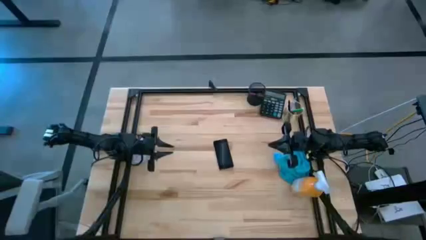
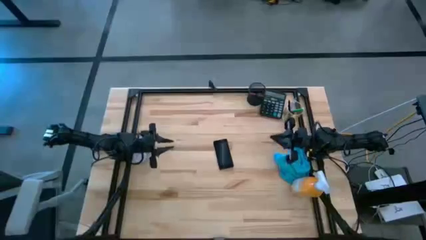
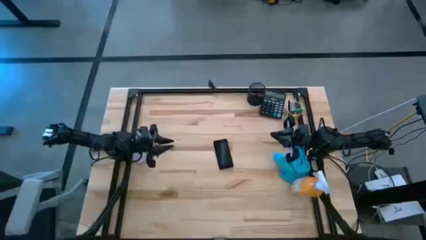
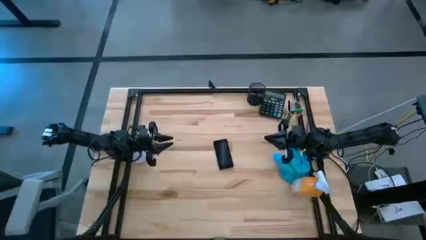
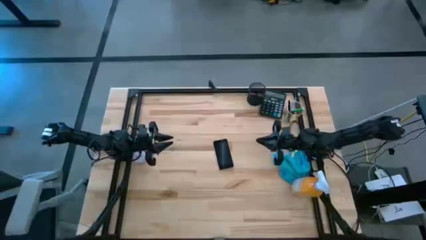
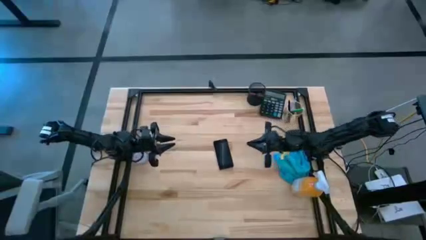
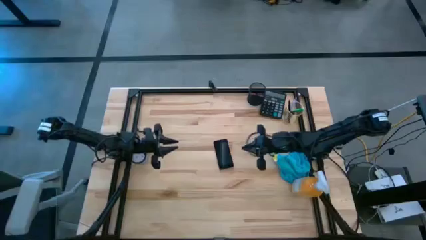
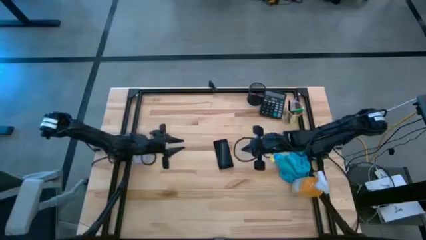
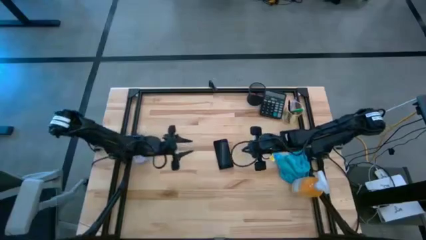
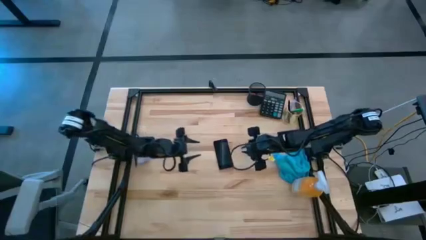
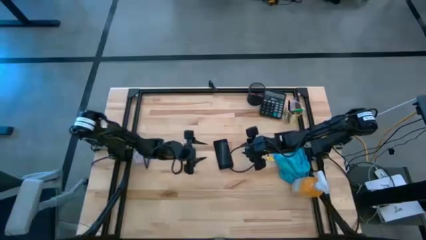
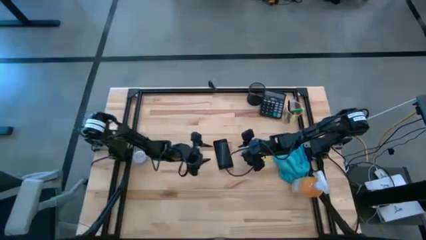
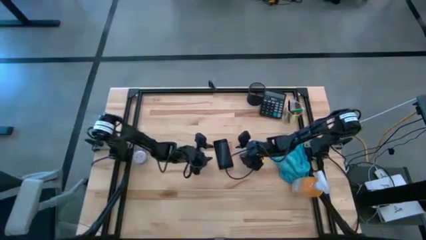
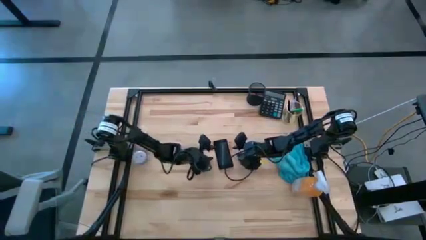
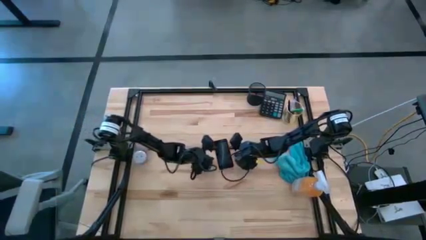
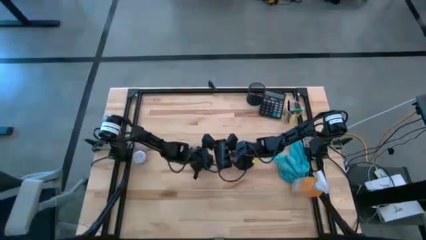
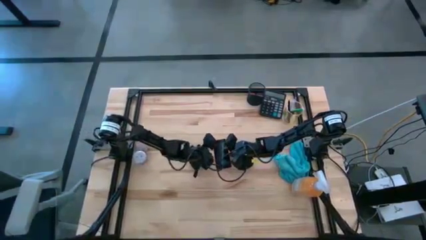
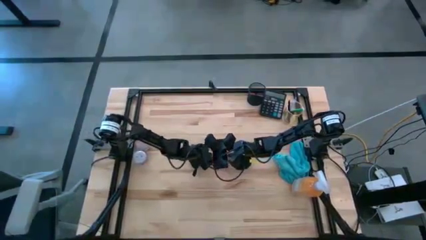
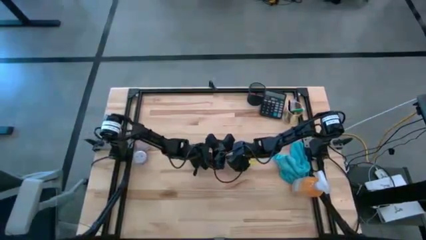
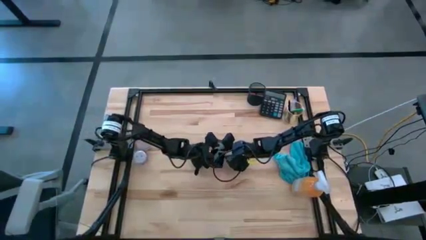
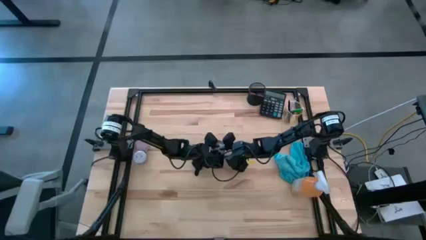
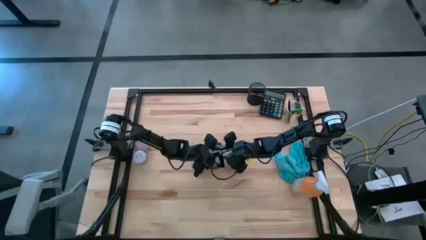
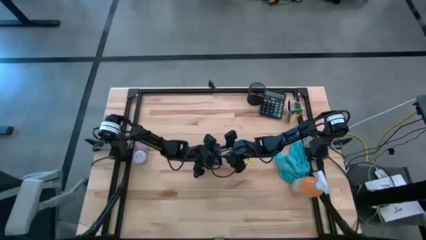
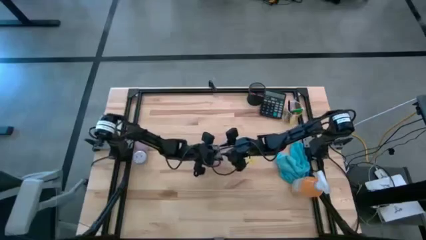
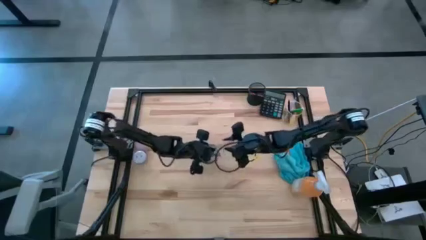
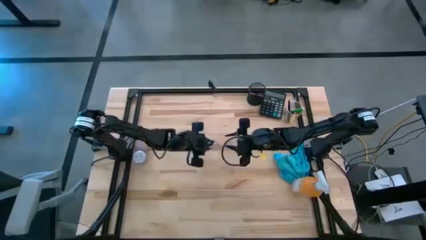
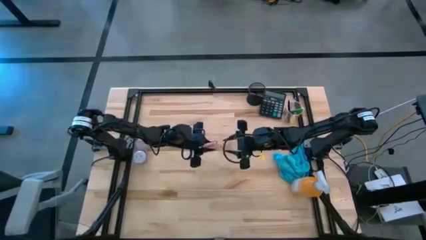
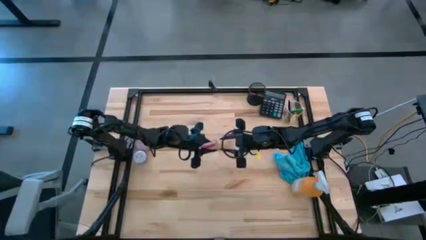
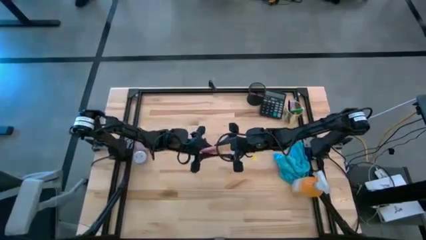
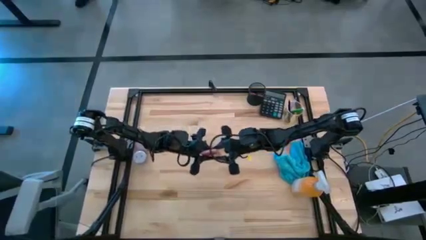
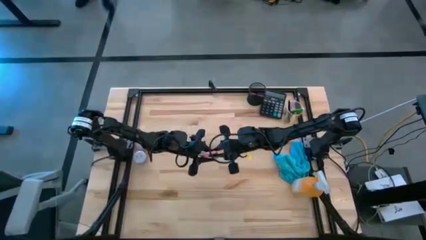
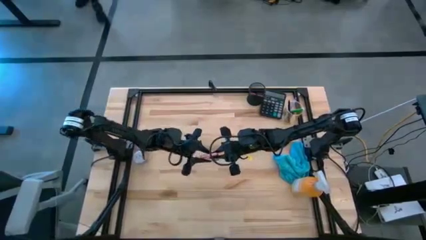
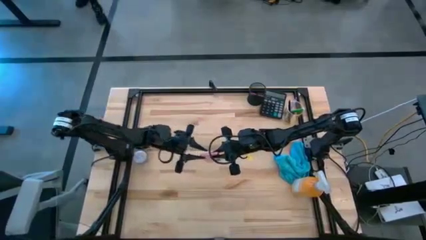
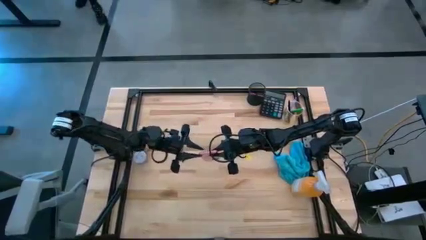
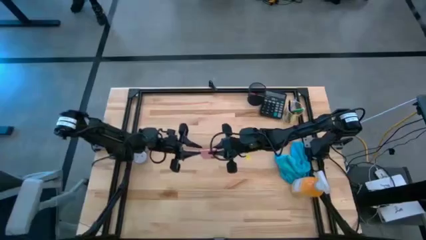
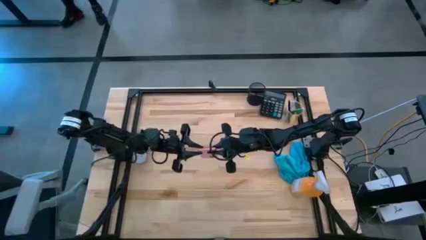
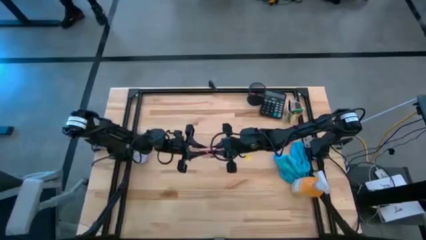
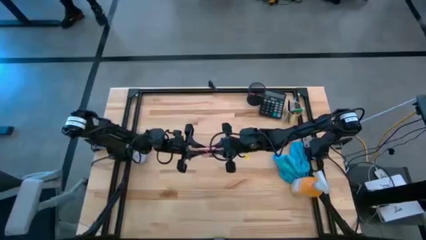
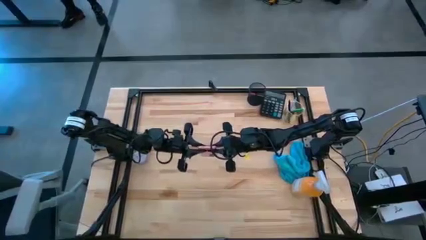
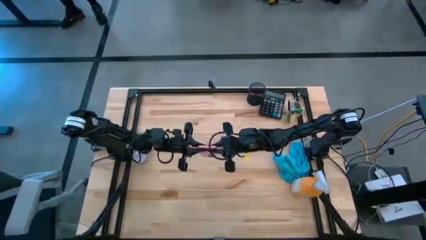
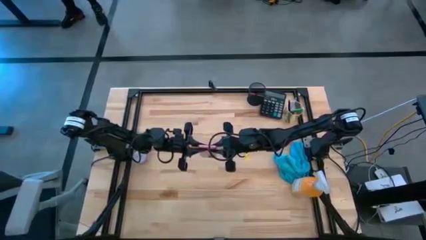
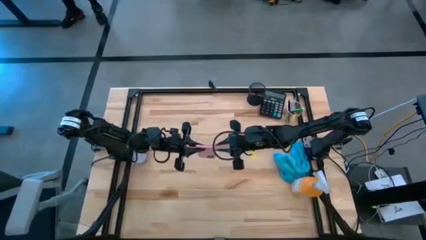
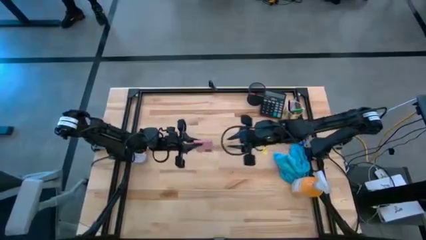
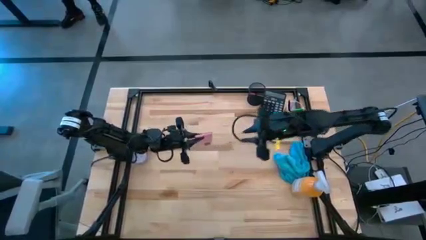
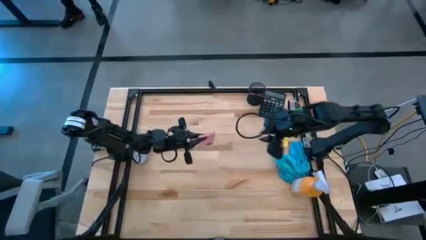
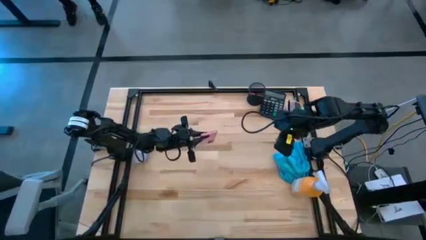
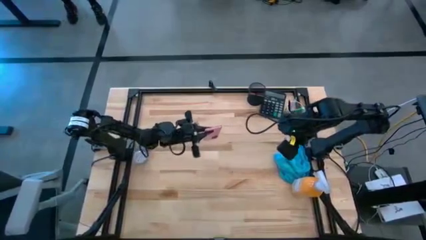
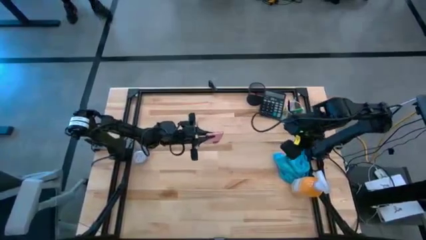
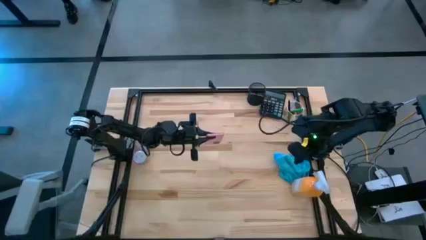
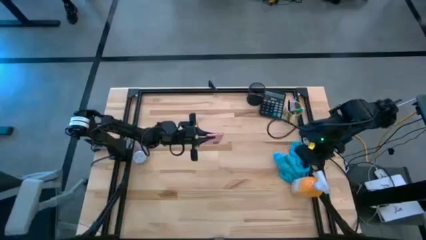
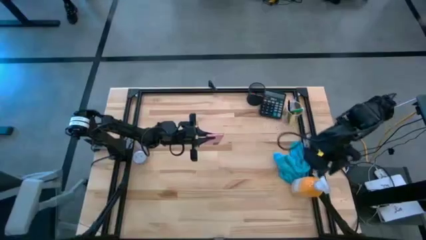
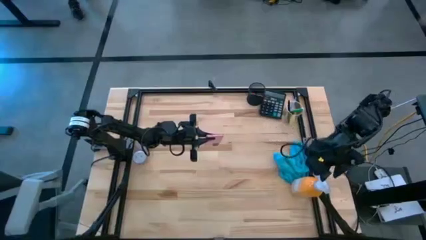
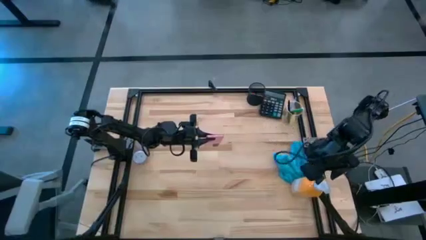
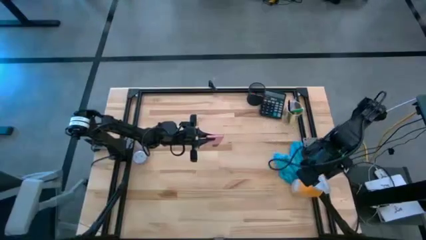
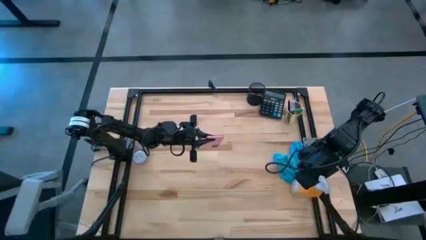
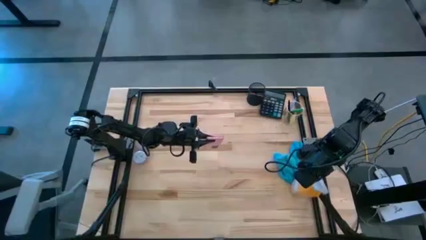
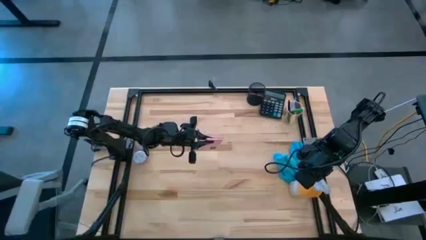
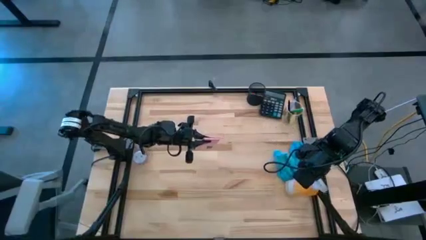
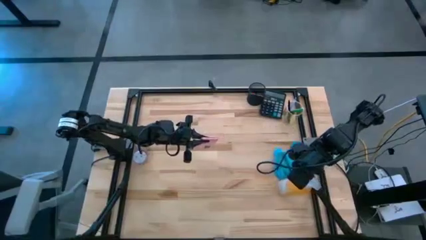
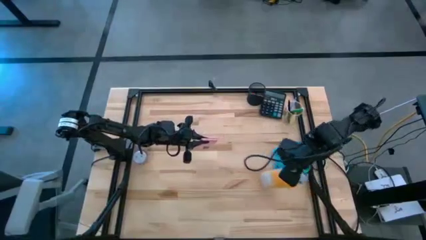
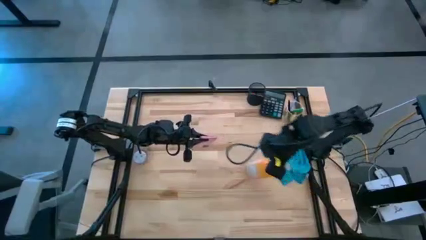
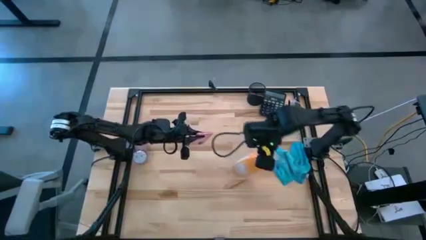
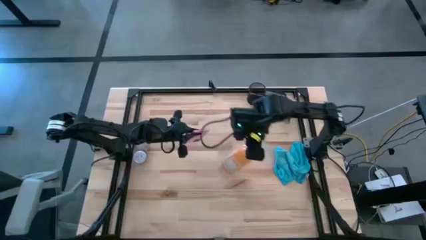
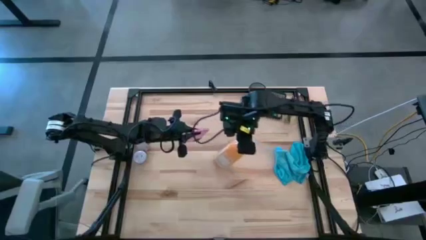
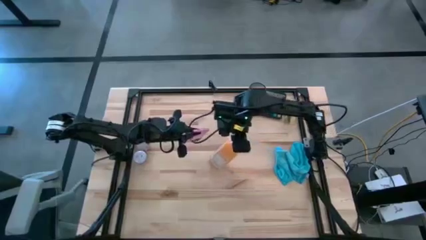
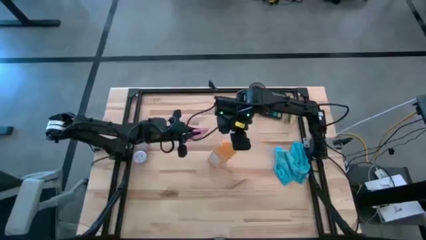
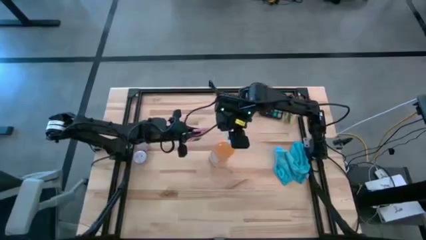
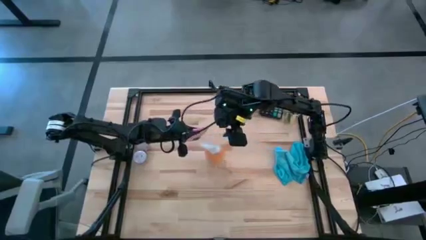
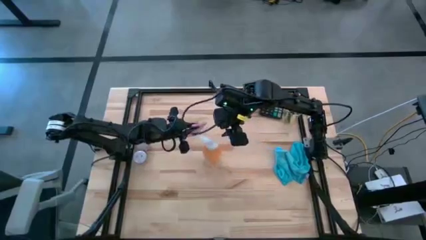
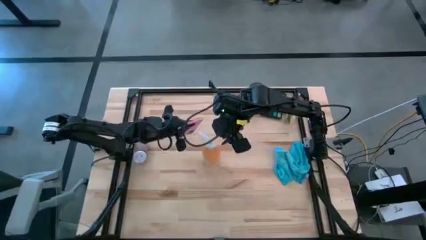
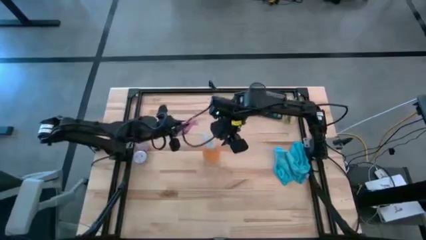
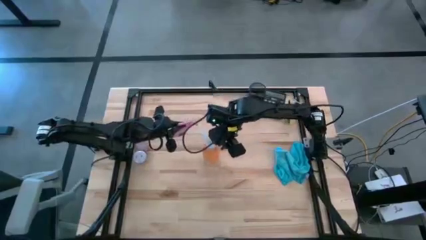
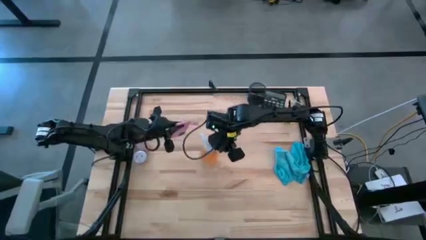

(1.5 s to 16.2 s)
Task: Apply microfiber cloth
Spray the cellphone with the spray bottle
